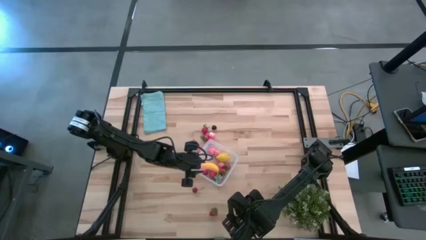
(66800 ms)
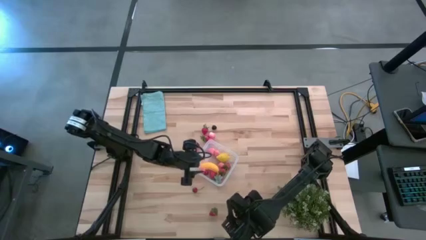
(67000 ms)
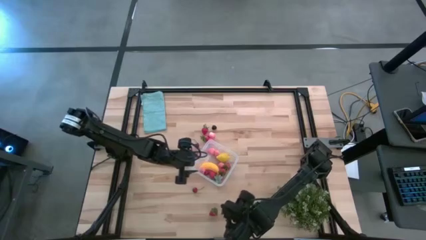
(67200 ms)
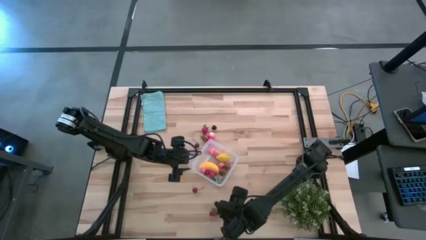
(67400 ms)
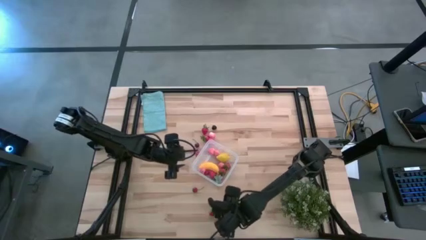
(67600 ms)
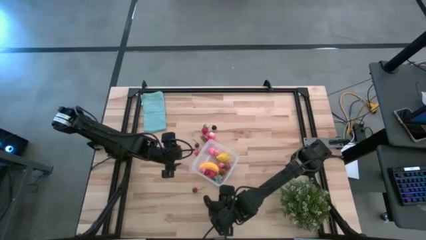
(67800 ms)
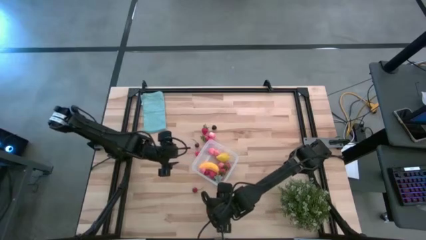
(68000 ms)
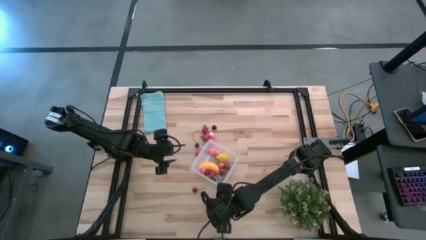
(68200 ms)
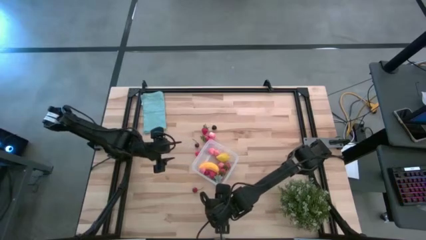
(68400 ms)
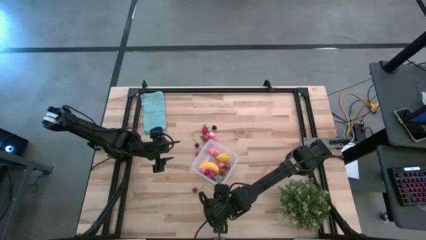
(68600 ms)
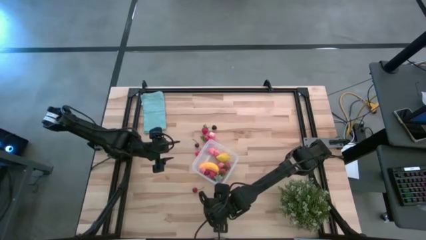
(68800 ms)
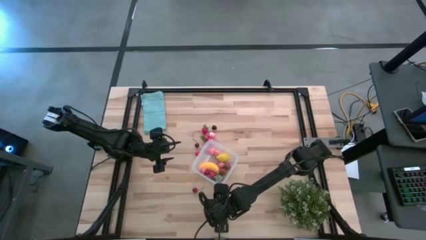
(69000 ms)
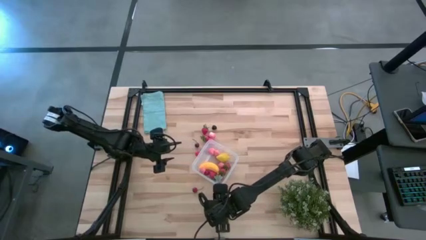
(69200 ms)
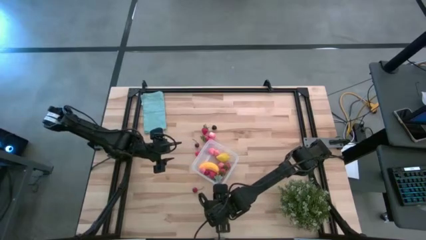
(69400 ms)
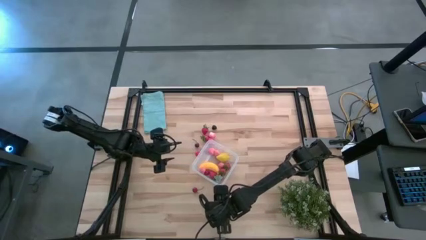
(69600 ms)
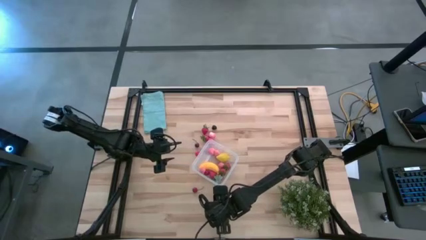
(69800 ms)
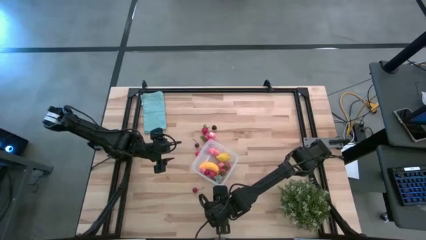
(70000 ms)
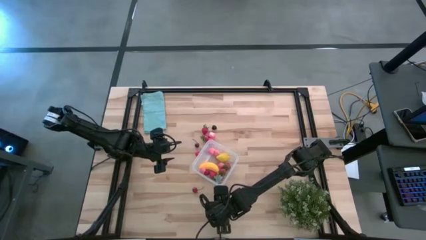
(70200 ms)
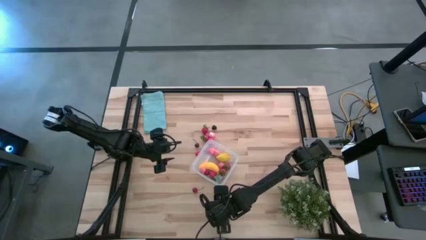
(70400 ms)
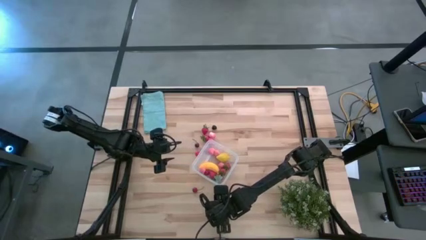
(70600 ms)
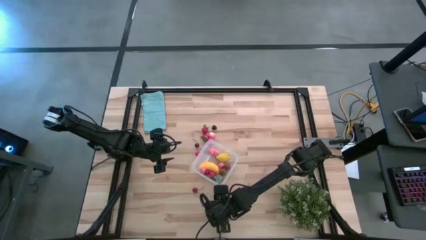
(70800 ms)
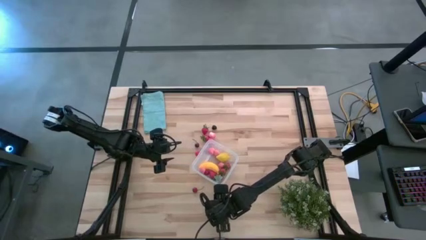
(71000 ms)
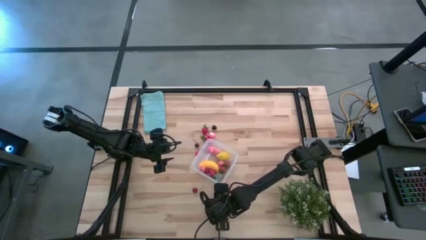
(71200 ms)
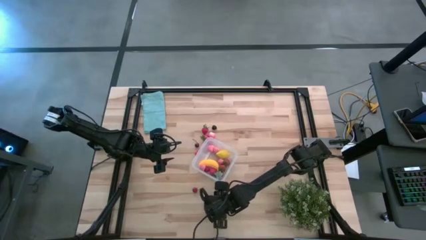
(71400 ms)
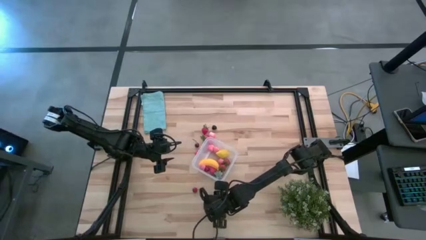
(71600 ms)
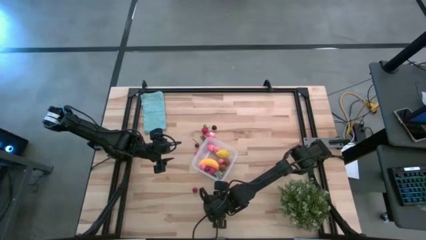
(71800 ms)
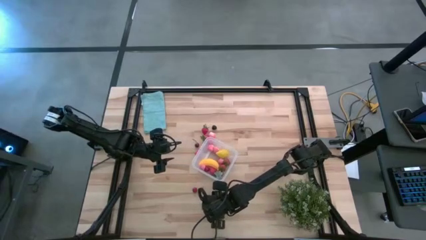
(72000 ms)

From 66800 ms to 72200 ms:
Task: Pick and placing Produce into tupperware
Put the red strawberry into the transparent container

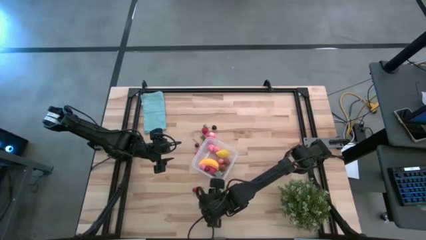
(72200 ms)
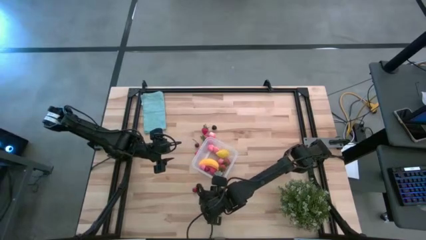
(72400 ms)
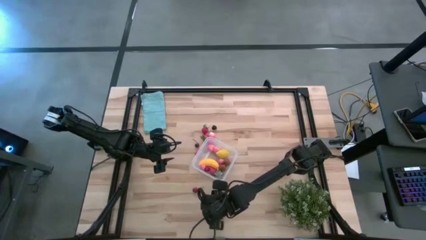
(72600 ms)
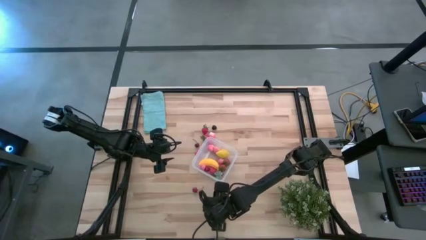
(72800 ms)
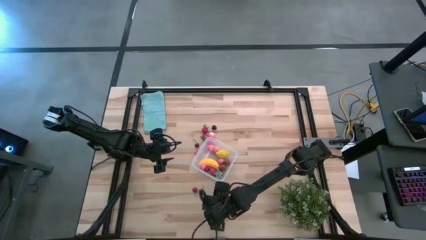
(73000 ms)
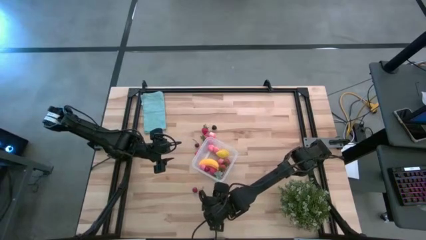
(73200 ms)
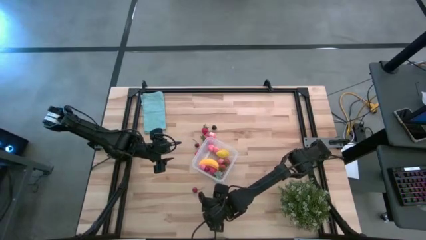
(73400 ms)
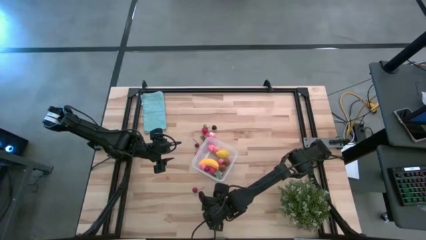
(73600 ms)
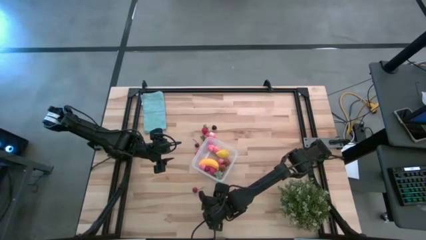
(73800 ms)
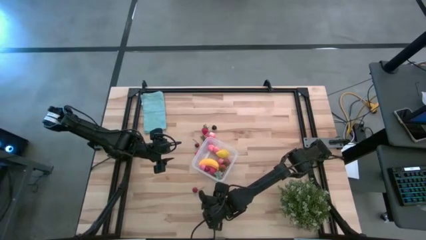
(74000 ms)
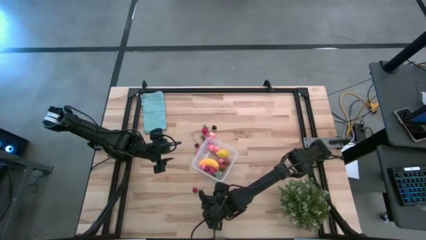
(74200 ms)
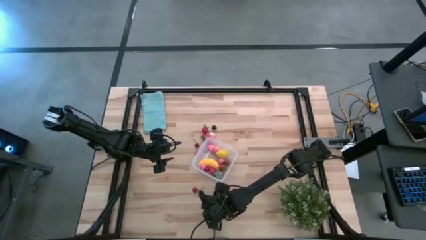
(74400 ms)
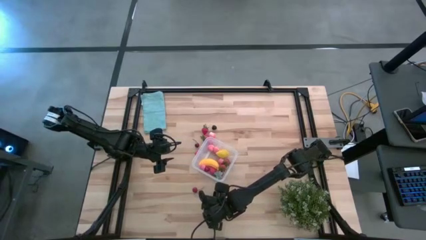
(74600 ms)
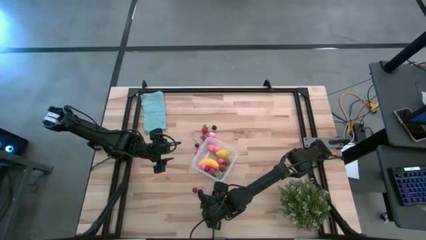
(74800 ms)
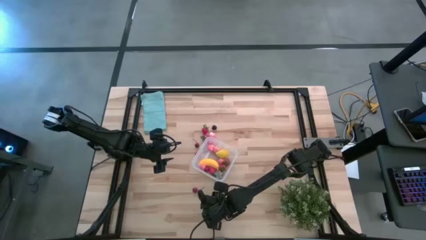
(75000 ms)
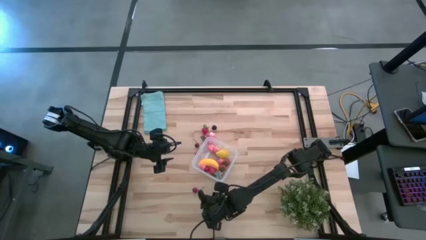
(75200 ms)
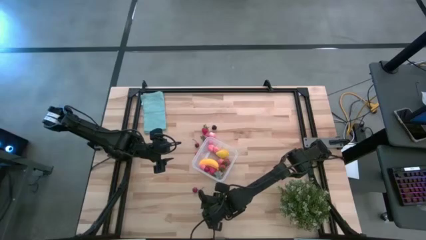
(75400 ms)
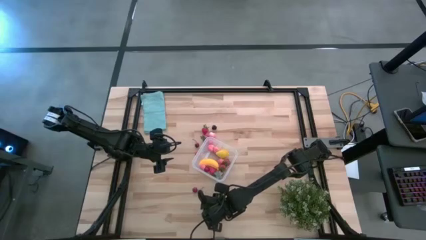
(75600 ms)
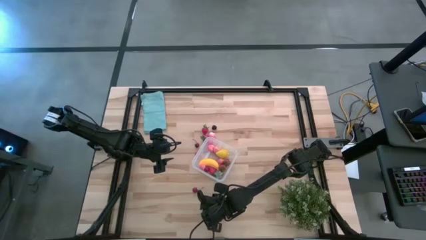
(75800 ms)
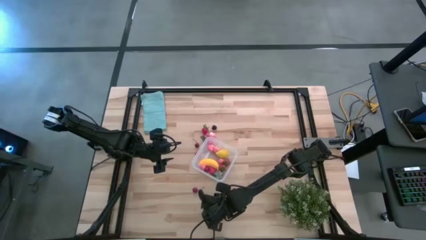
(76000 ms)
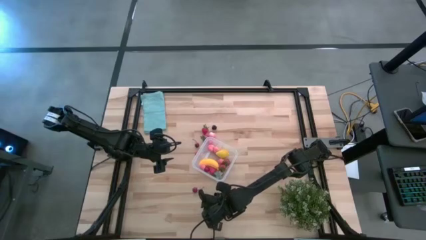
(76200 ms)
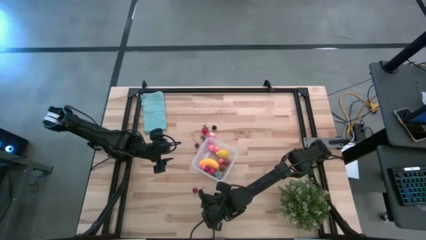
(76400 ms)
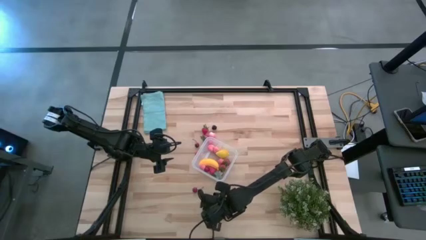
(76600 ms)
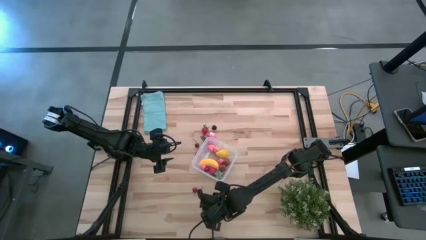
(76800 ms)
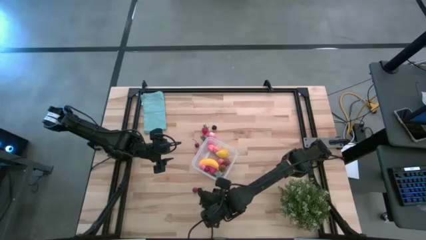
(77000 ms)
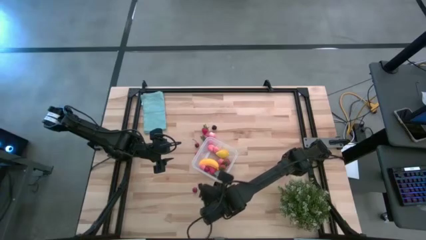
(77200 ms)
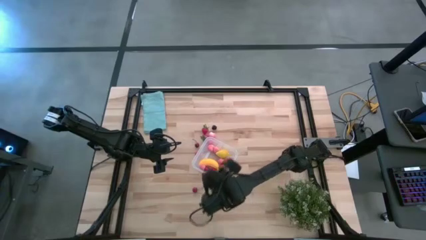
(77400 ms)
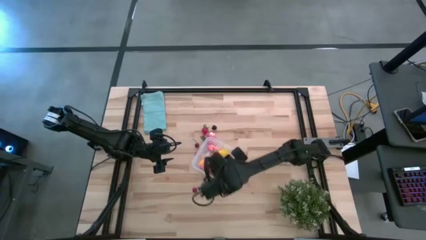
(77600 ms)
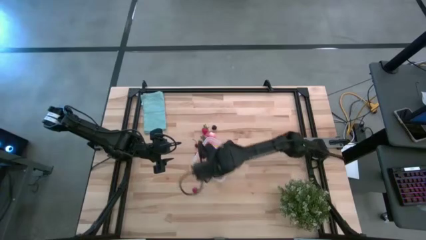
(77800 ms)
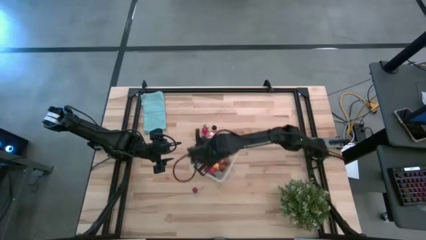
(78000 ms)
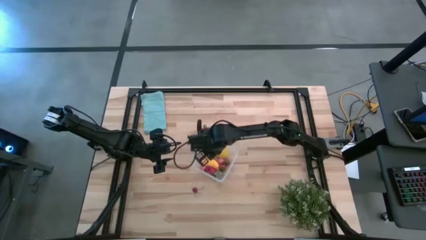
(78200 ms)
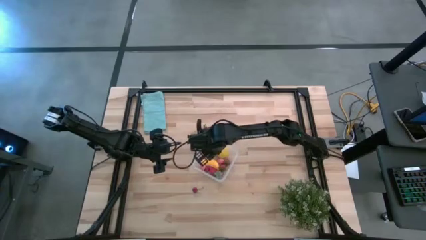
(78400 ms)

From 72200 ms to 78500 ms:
Put the red strawberry into the transparent container

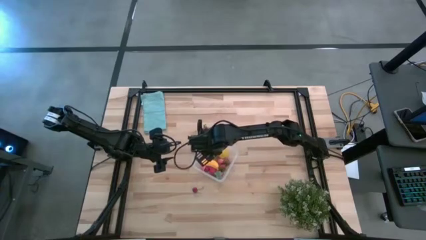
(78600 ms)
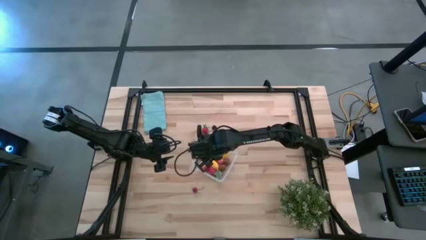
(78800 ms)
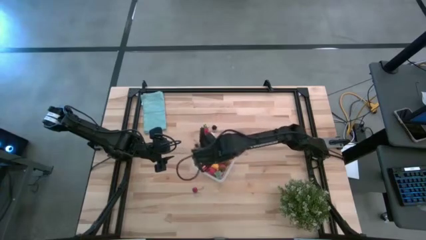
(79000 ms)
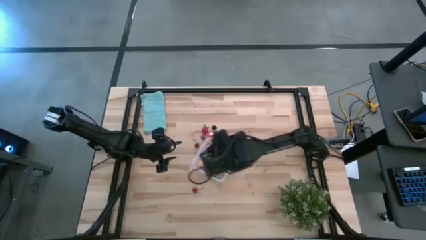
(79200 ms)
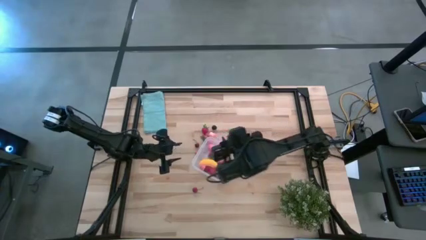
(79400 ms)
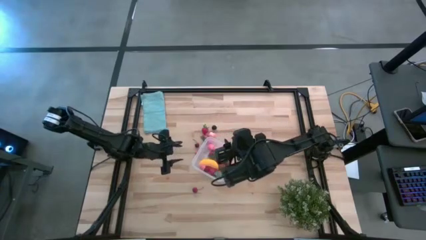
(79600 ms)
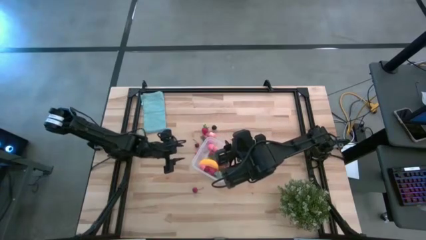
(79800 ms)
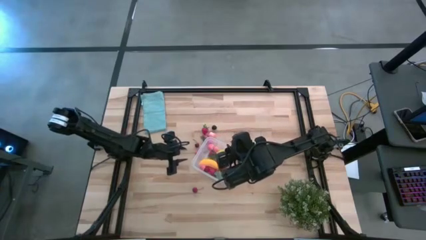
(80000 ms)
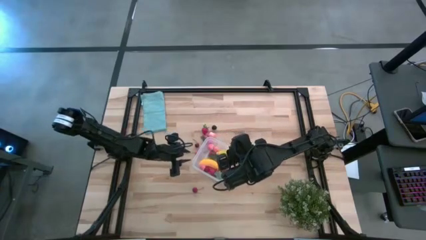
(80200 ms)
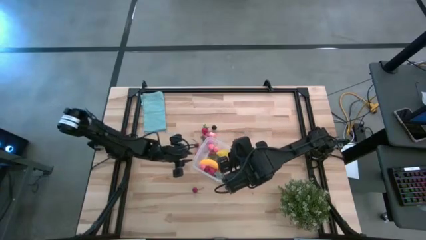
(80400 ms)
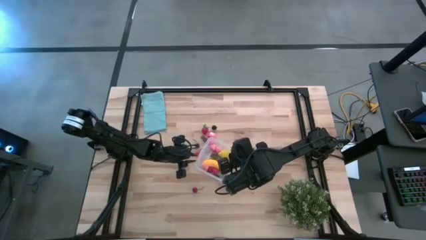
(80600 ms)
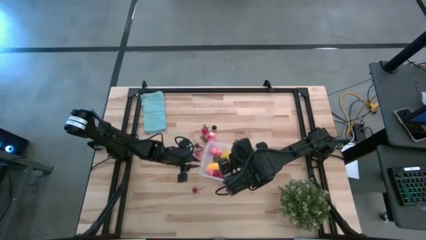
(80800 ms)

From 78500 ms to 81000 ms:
Adjust the transparent container

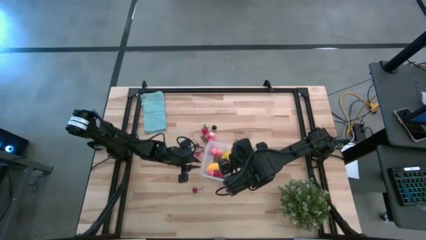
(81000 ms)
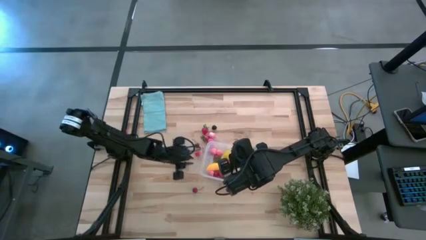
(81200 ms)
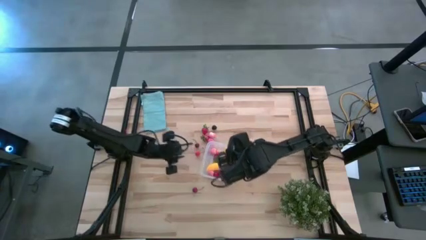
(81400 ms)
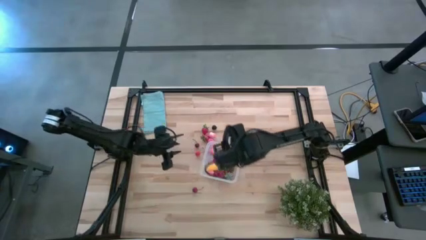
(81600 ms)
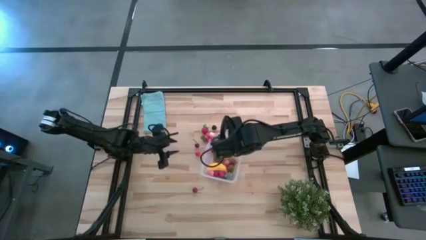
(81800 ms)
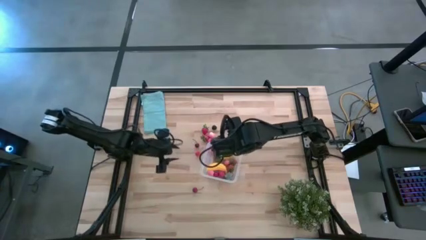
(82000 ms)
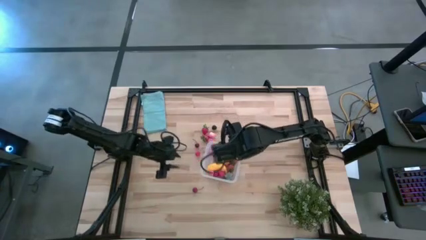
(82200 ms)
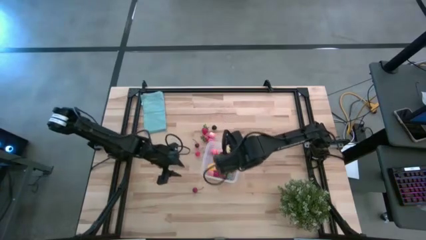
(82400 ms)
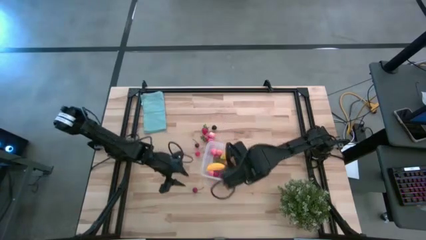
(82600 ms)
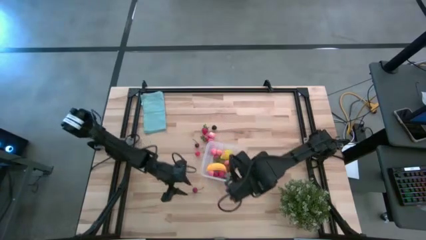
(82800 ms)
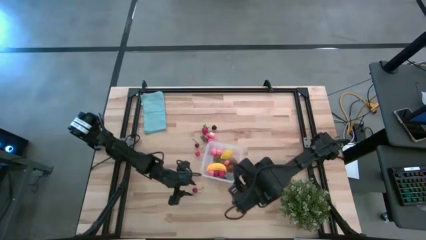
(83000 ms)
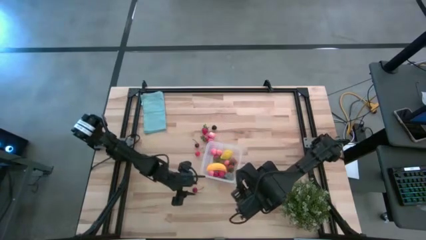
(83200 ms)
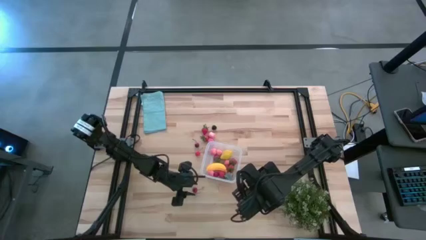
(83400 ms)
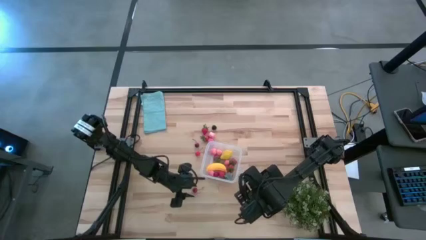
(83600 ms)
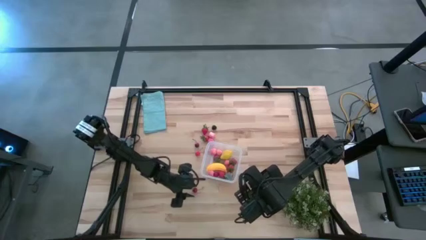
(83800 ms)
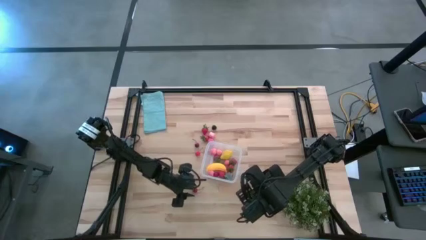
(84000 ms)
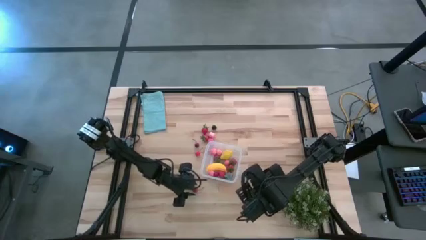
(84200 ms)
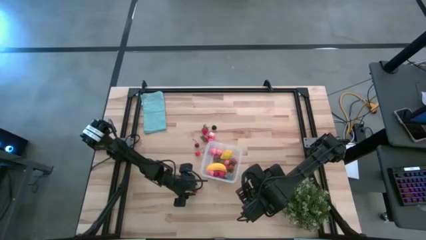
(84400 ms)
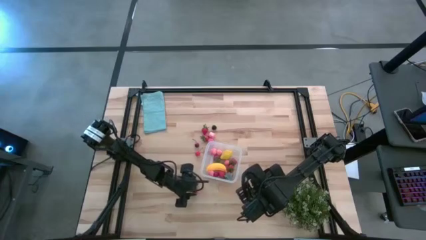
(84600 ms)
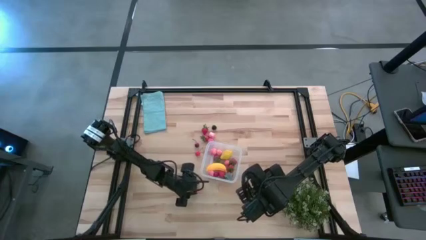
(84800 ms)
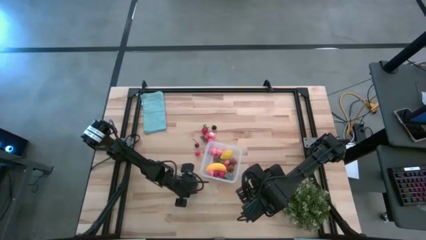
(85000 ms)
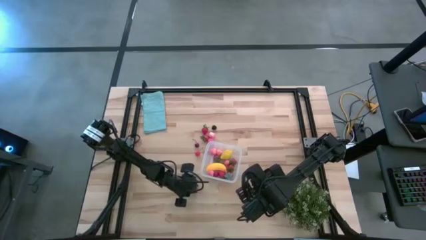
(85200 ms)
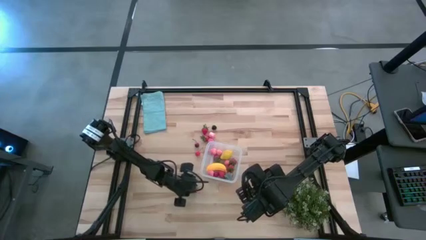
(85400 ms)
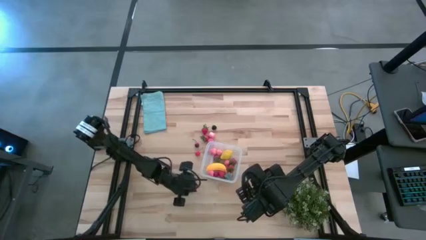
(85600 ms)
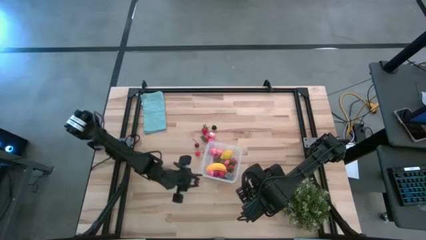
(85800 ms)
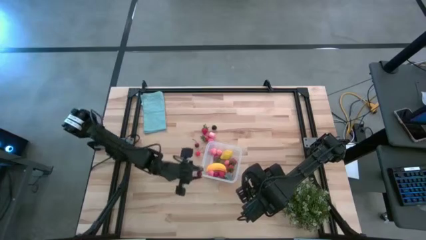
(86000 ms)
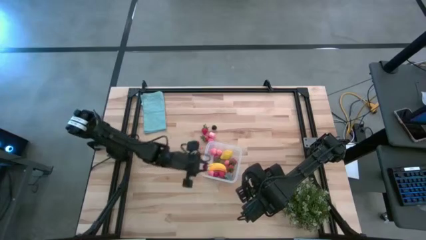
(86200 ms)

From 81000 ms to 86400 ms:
Put the red cherry into the transparent container
